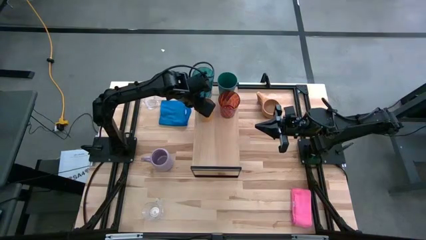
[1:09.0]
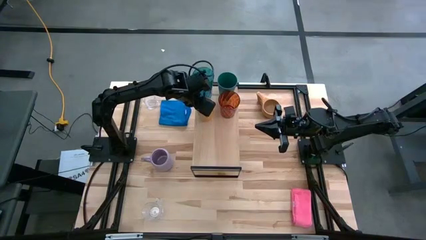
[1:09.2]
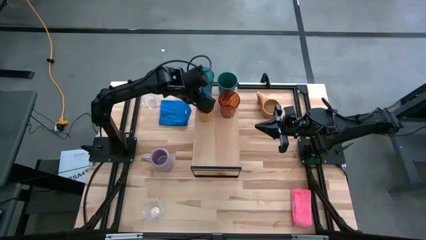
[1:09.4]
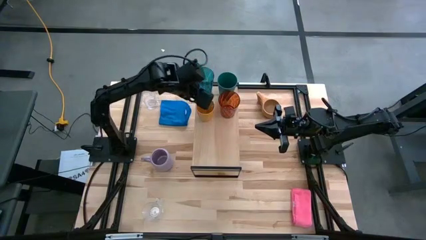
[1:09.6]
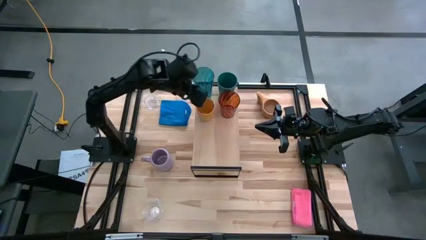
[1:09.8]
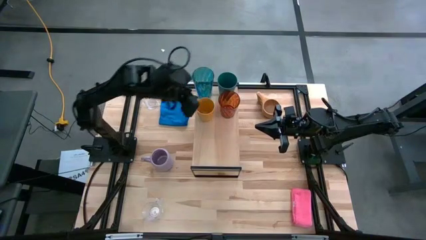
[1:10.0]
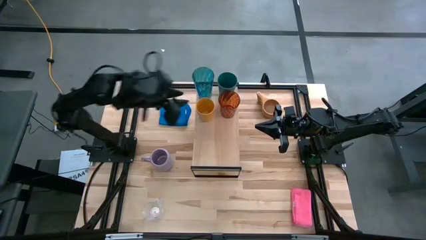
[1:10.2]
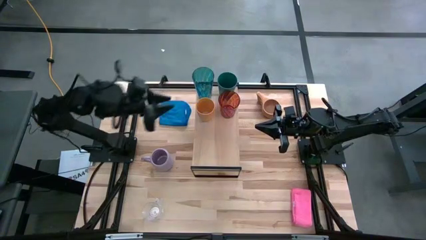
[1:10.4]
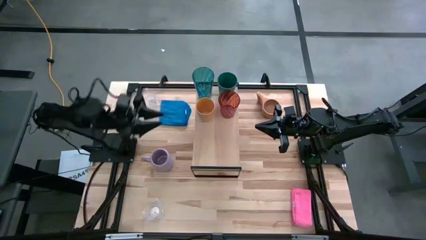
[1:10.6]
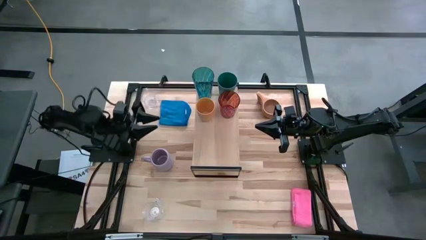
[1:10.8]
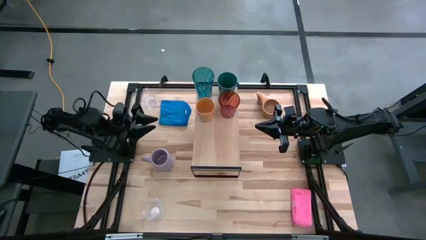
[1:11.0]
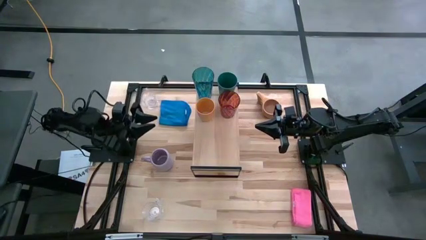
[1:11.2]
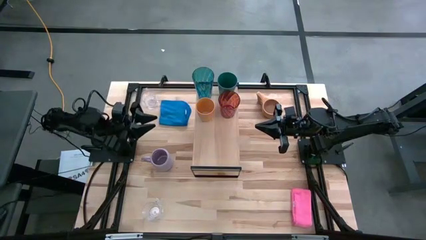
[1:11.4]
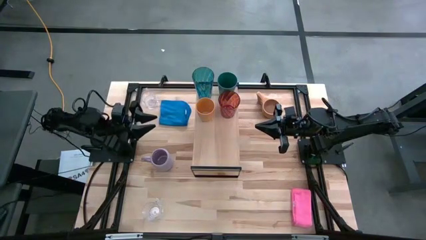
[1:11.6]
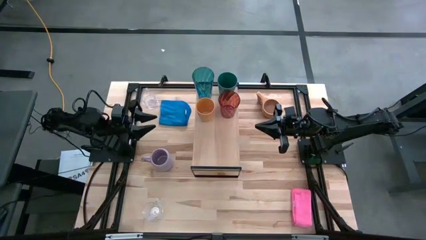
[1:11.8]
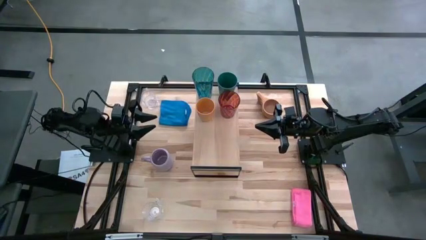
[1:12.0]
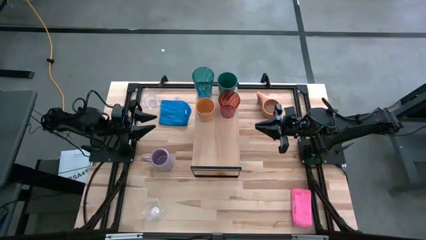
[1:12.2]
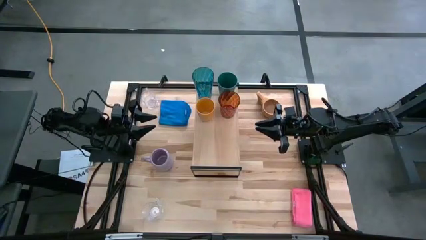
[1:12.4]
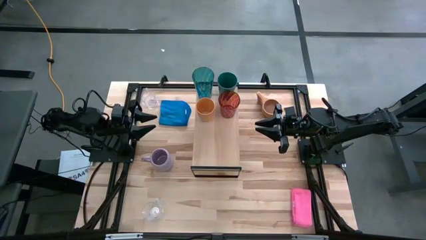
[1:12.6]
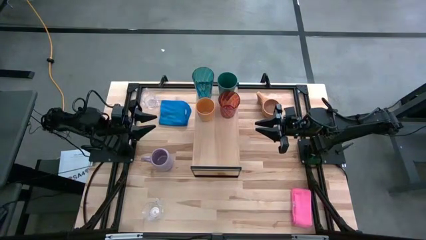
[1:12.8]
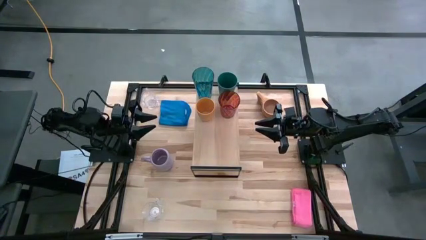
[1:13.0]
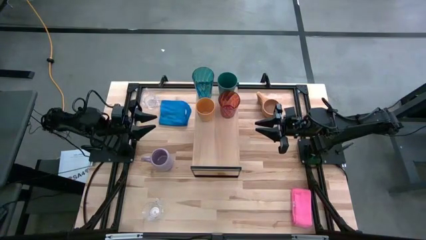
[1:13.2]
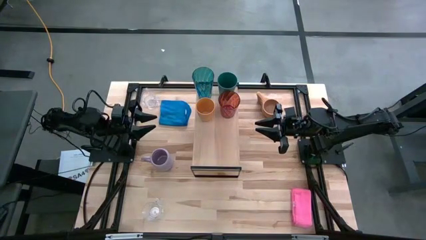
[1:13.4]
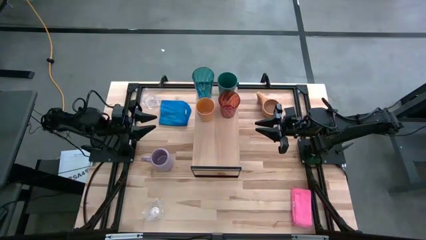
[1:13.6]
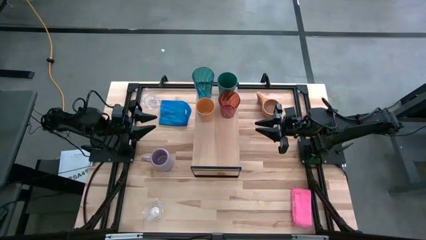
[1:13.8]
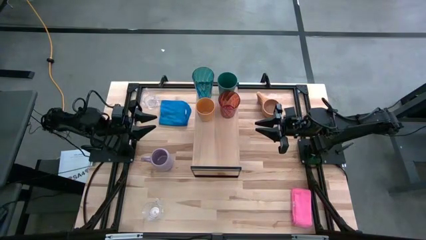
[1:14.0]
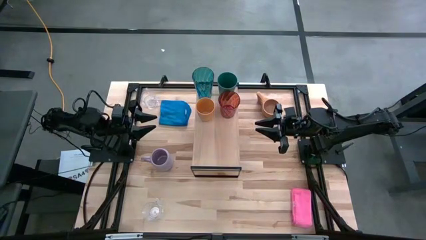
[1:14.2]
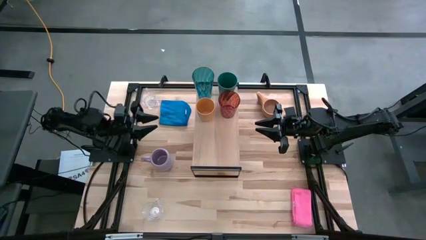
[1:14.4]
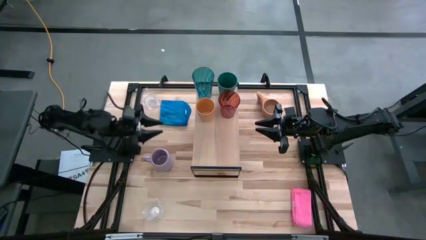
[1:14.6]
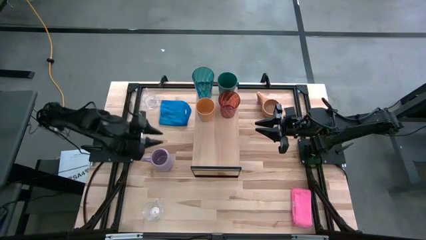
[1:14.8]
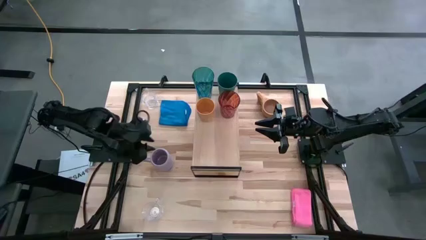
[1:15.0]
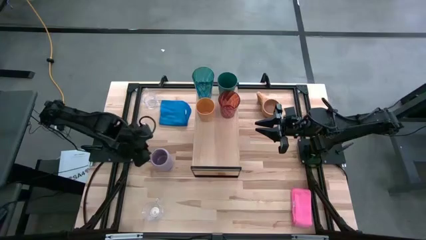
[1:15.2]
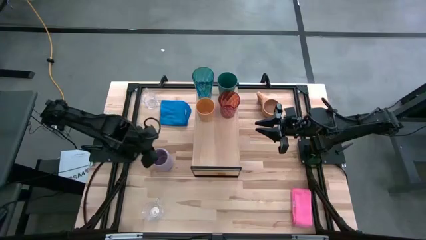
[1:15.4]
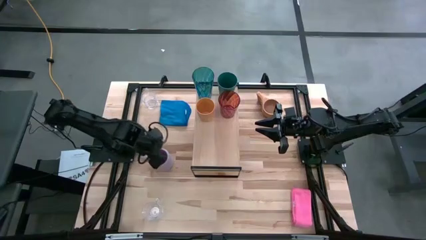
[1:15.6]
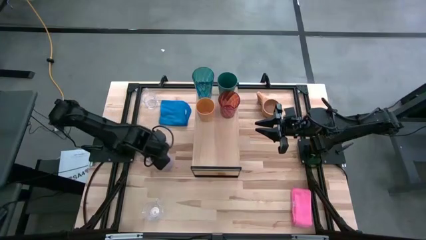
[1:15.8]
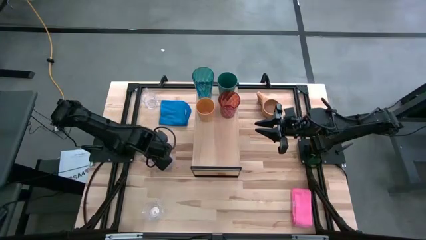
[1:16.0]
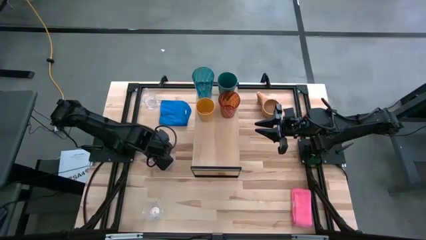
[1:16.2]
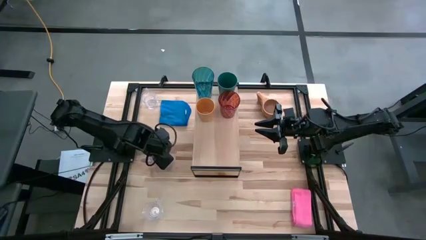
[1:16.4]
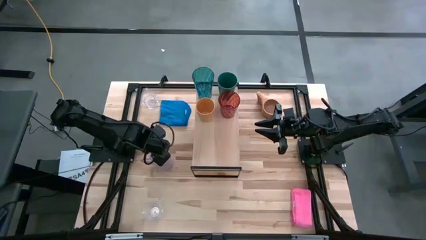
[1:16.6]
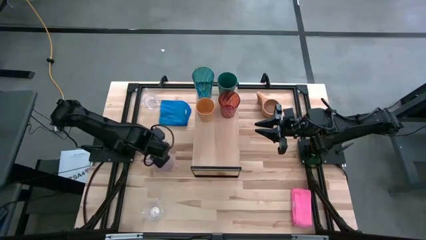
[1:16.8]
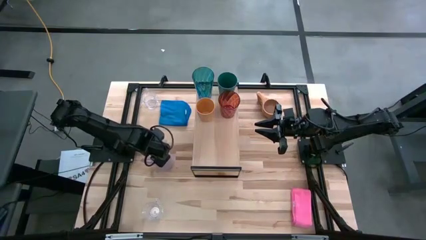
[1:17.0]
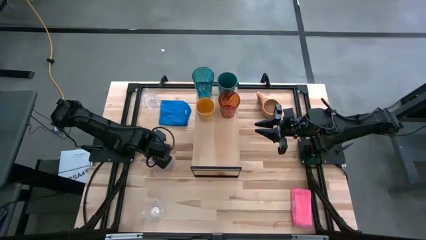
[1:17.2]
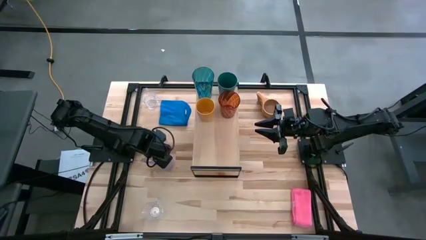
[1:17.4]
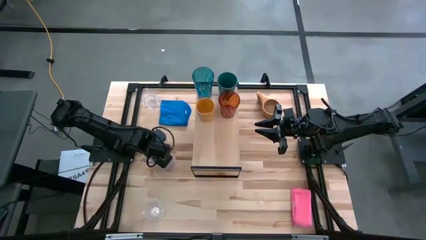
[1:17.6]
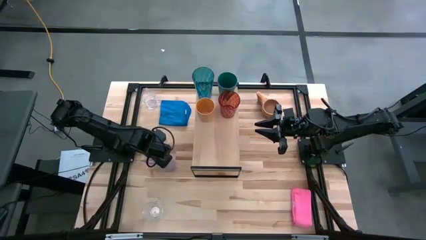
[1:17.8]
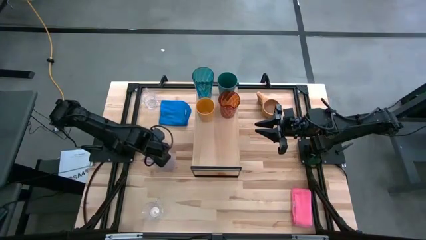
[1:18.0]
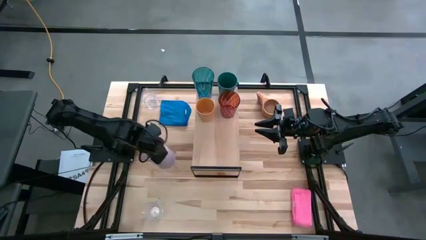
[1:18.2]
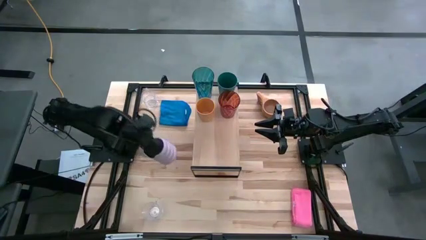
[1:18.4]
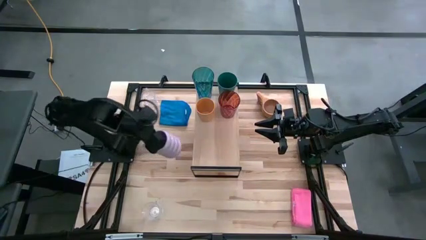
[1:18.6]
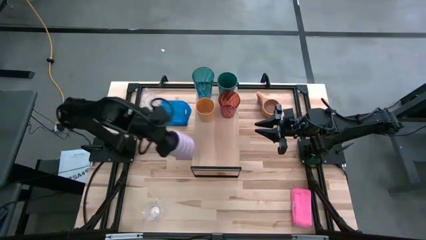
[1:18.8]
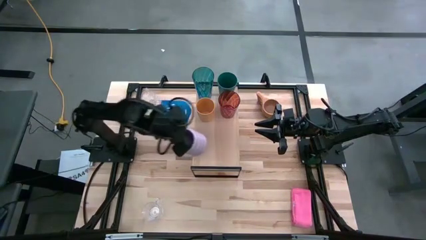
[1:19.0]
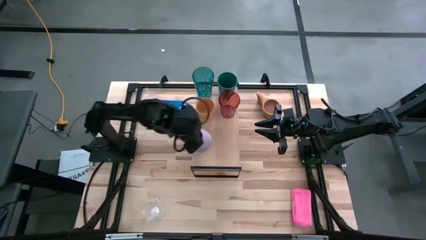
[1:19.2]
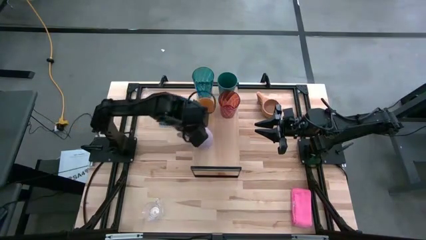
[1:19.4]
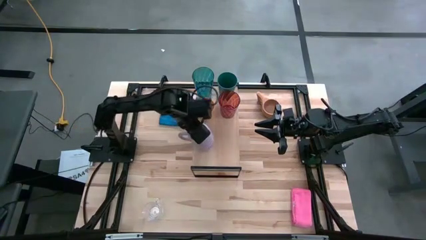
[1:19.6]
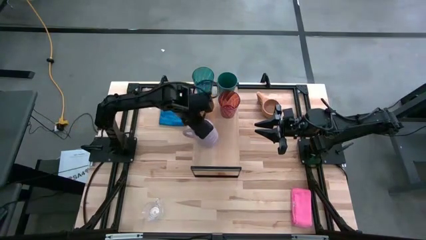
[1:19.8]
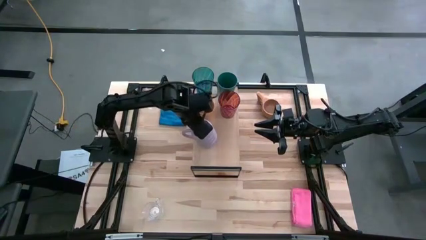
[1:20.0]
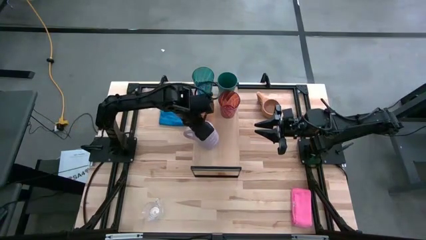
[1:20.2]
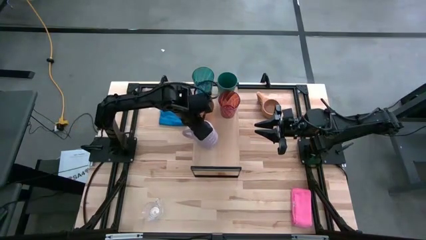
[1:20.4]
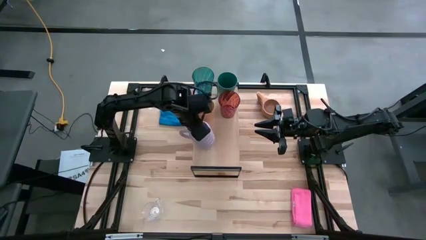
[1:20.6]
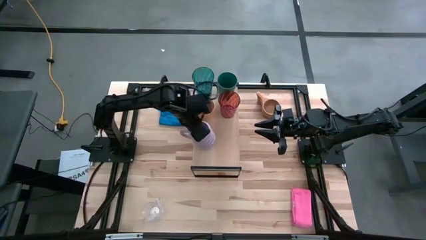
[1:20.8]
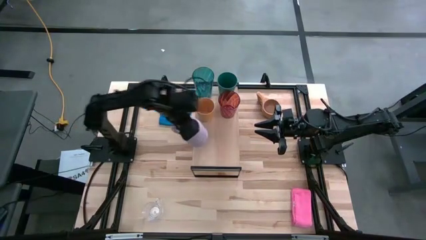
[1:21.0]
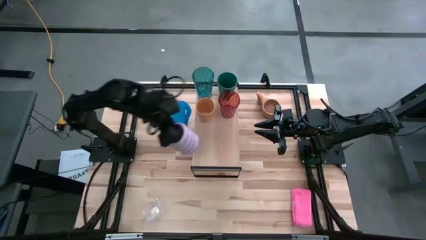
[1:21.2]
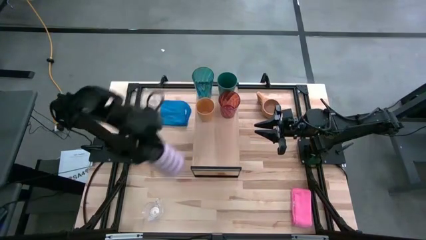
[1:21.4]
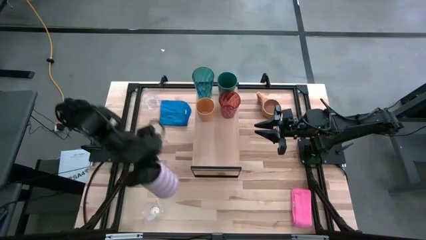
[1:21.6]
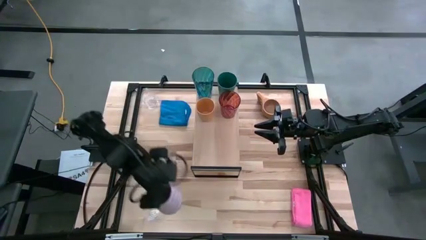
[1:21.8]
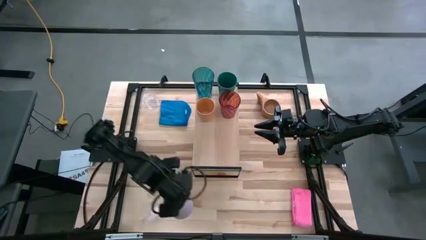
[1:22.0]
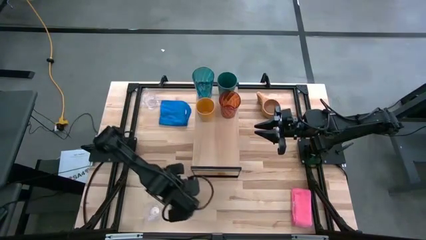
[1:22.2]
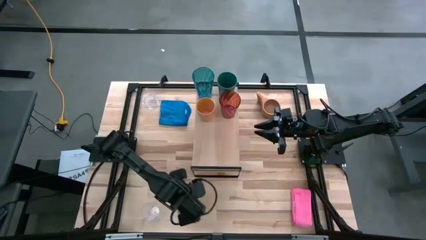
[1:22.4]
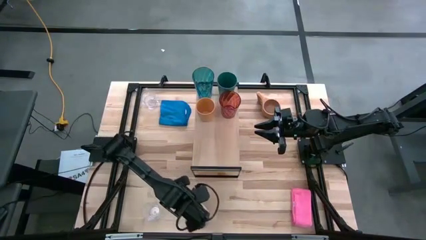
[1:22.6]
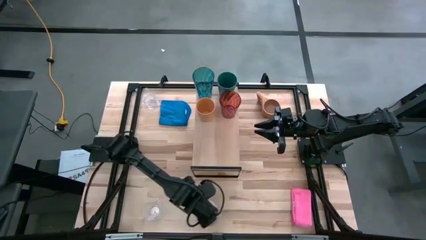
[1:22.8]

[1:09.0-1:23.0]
Task: Stack small to large cups/mugs on shelf
Put the purple mug on the shelf

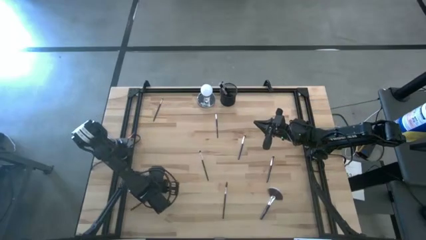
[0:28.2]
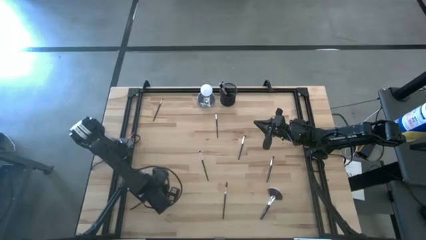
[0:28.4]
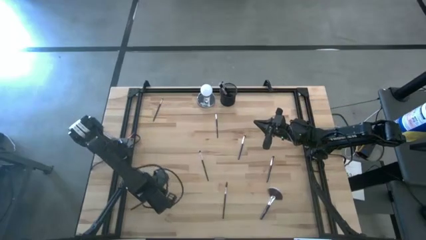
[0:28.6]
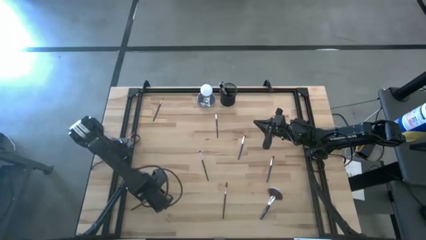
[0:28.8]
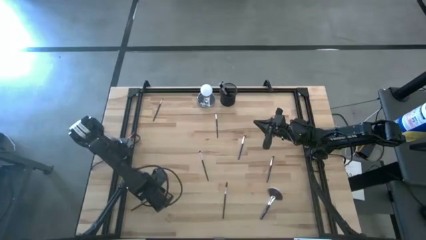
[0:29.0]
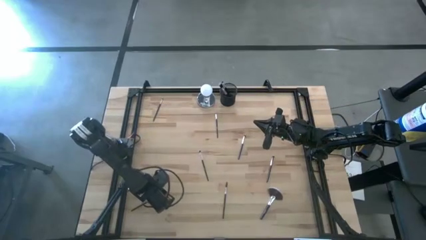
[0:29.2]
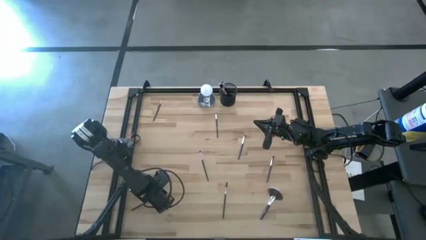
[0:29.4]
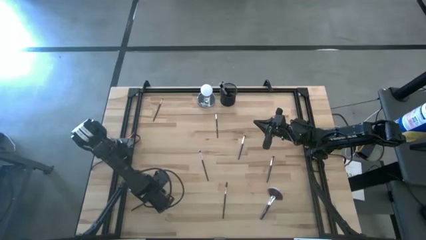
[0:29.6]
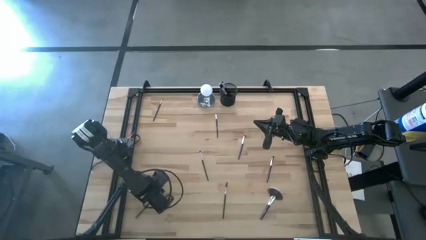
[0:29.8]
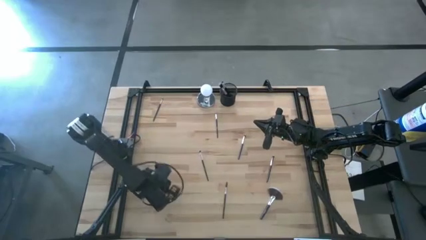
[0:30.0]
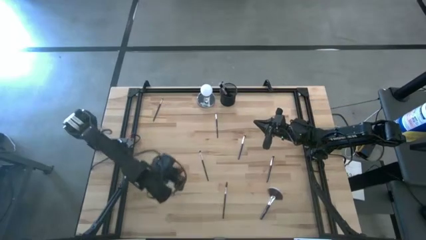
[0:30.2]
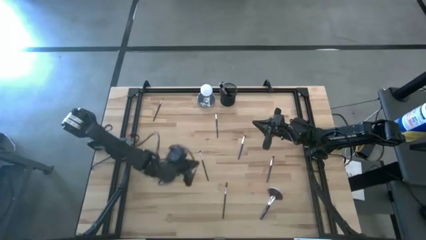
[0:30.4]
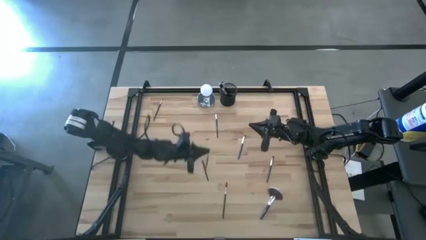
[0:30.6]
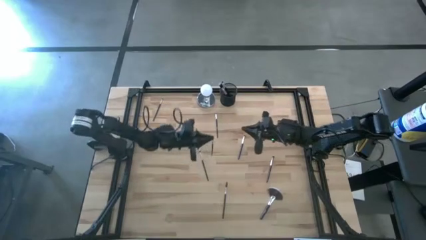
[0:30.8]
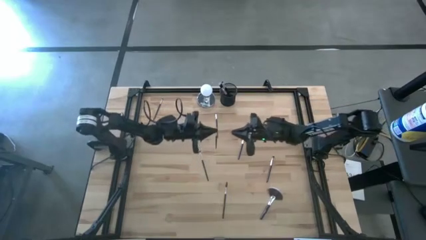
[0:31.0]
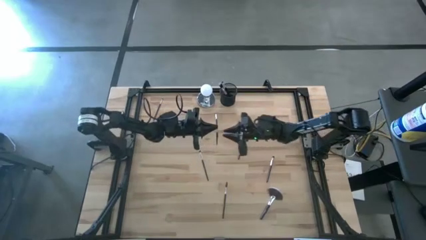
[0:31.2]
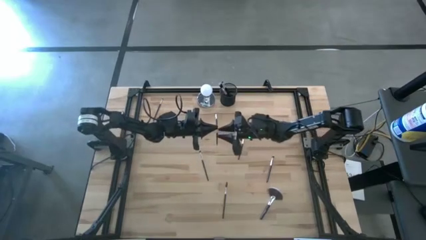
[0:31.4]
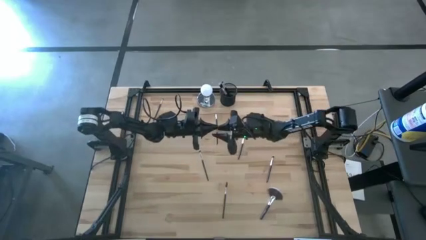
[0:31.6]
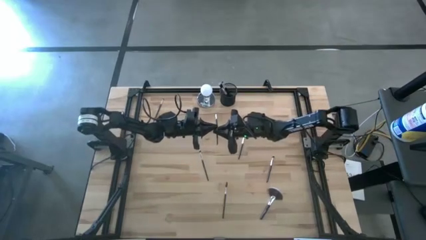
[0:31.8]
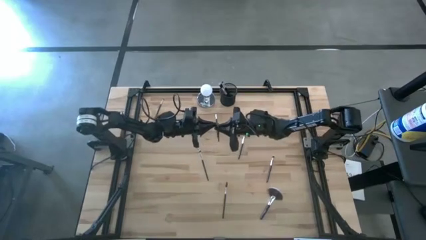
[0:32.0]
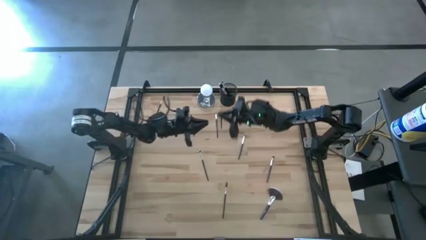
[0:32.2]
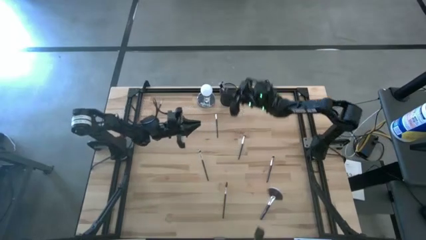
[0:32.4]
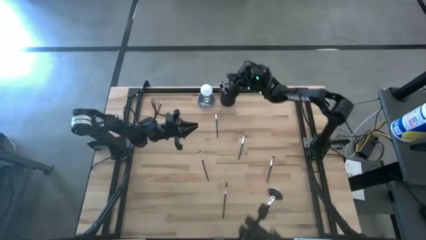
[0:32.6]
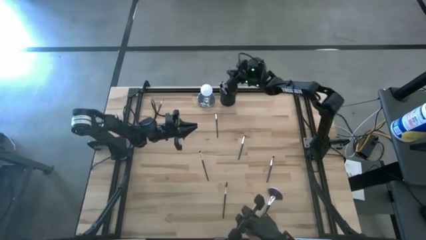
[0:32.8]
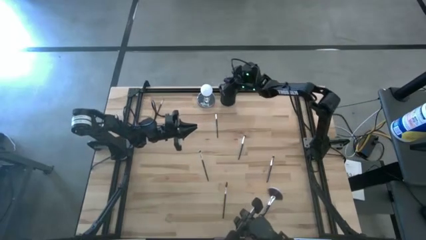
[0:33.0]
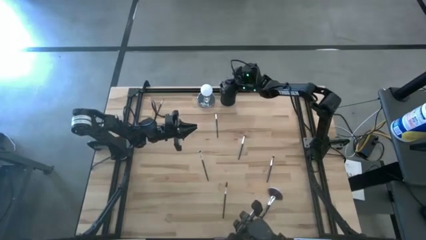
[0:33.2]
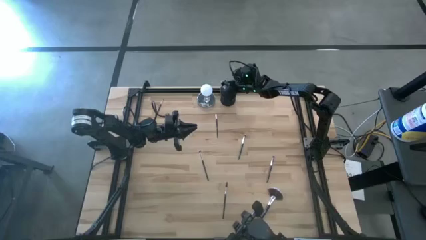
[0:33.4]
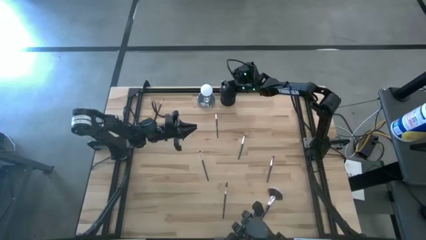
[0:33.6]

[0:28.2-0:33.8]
Task: Pick & Place Makeup Supplies
Put the makeup brush into the black makeup holder
